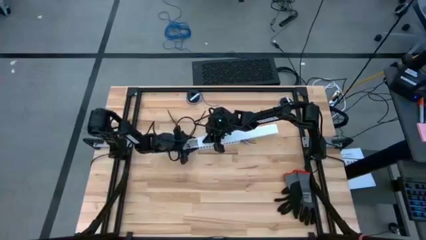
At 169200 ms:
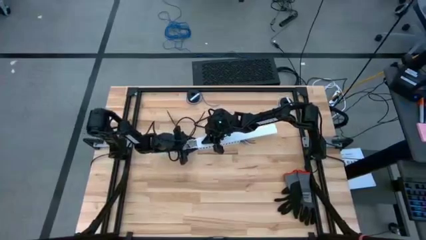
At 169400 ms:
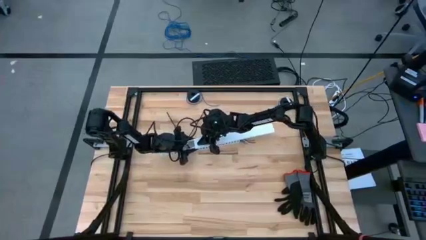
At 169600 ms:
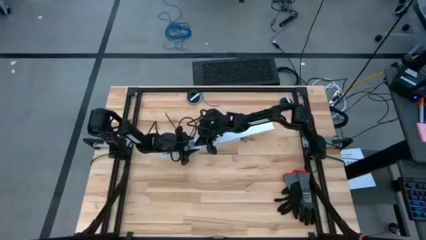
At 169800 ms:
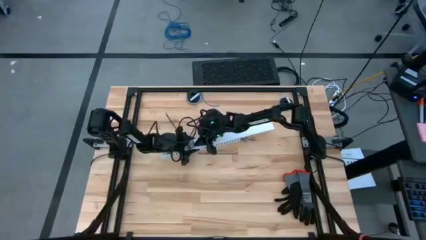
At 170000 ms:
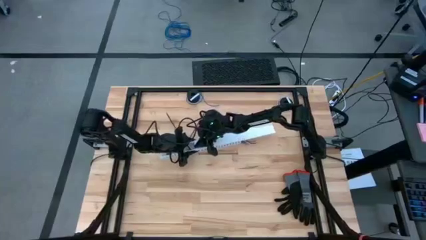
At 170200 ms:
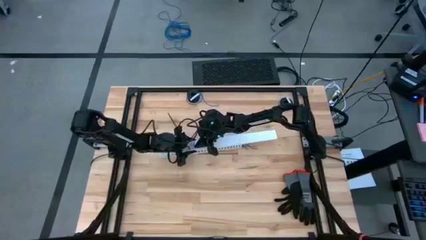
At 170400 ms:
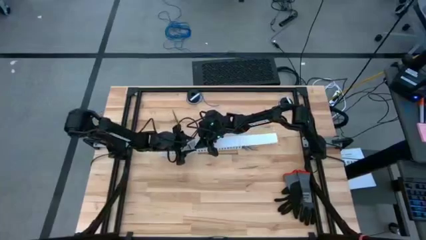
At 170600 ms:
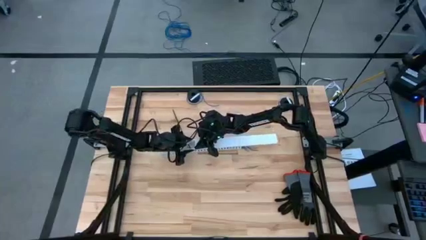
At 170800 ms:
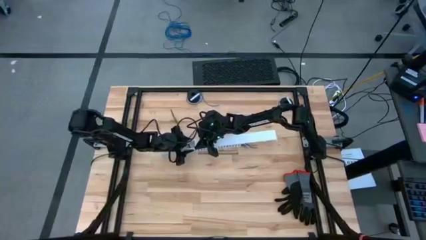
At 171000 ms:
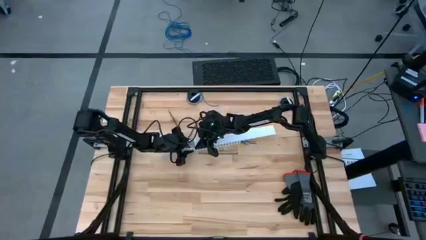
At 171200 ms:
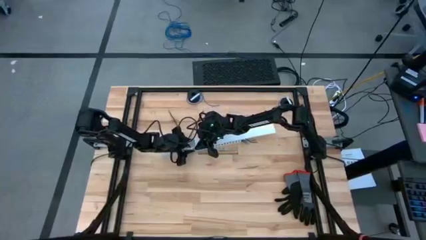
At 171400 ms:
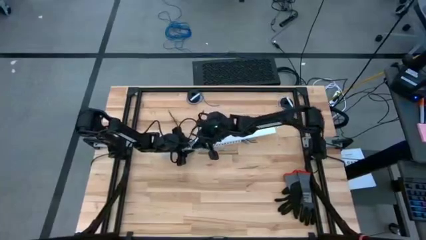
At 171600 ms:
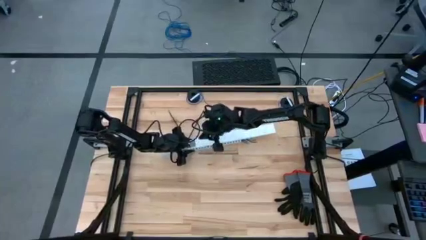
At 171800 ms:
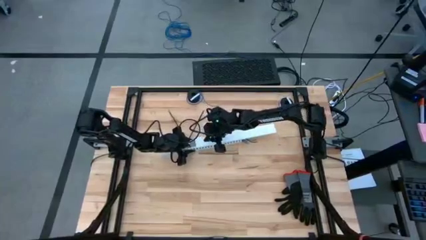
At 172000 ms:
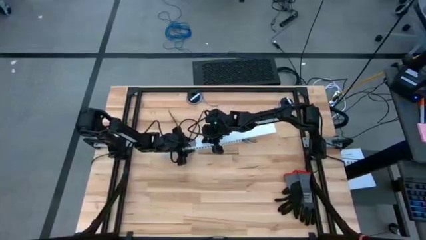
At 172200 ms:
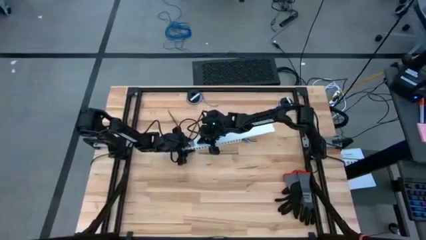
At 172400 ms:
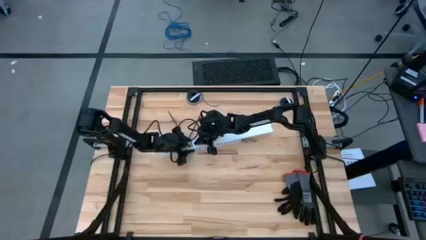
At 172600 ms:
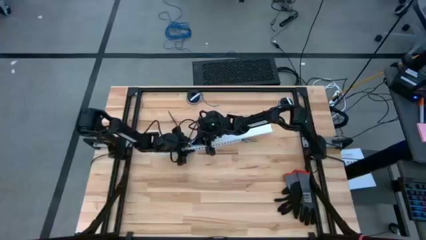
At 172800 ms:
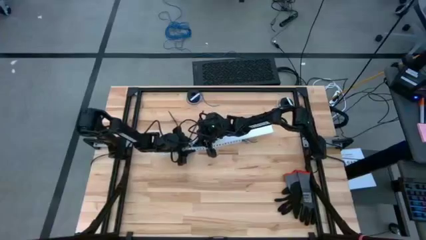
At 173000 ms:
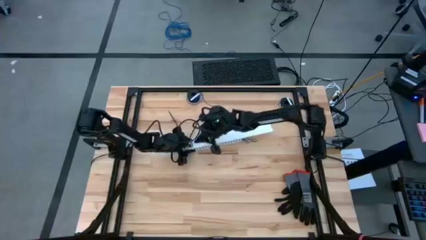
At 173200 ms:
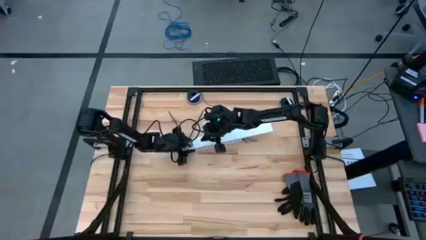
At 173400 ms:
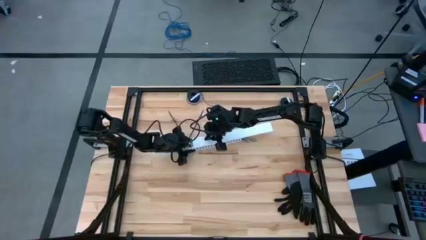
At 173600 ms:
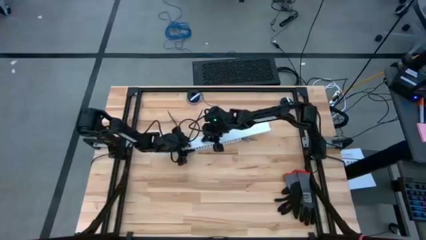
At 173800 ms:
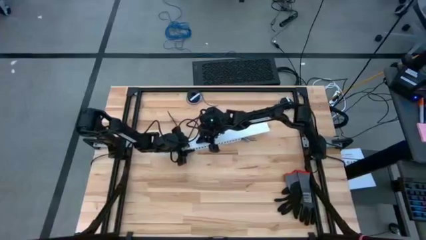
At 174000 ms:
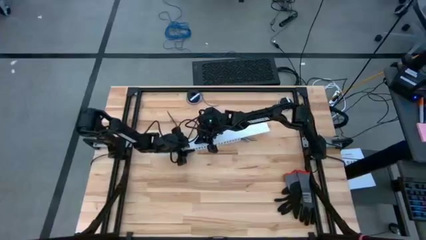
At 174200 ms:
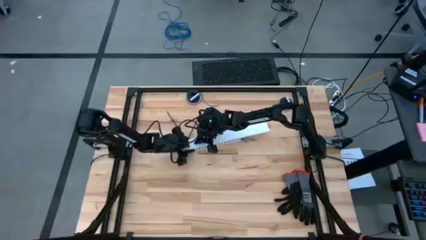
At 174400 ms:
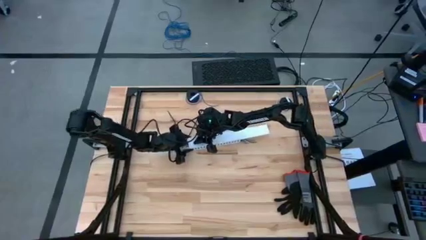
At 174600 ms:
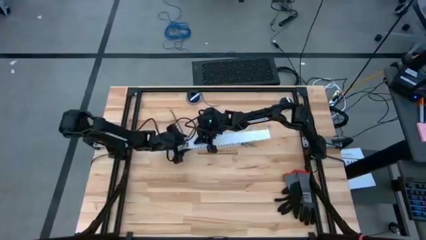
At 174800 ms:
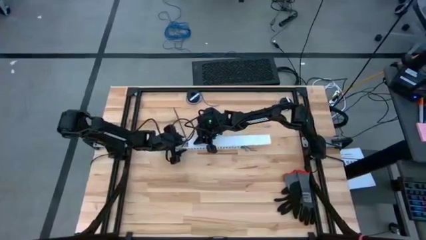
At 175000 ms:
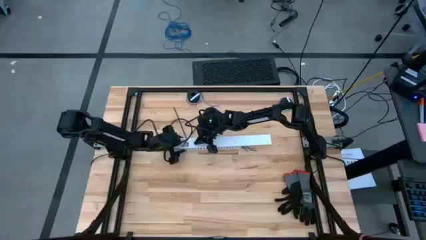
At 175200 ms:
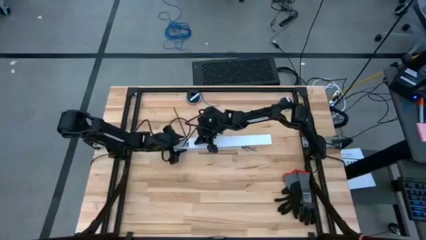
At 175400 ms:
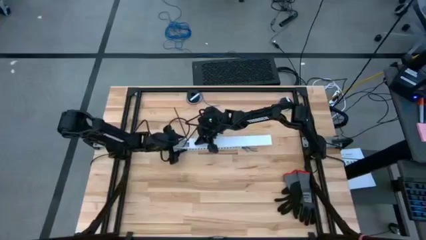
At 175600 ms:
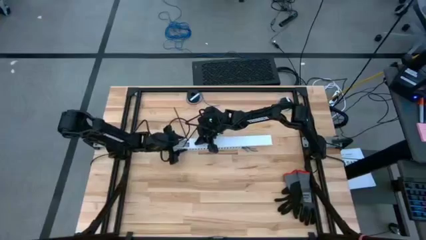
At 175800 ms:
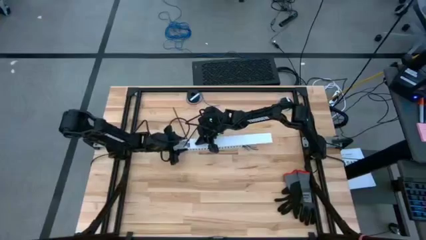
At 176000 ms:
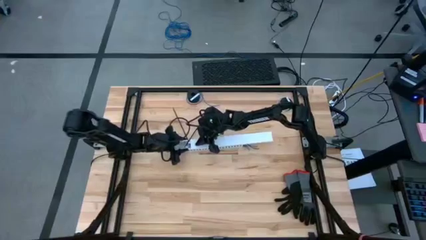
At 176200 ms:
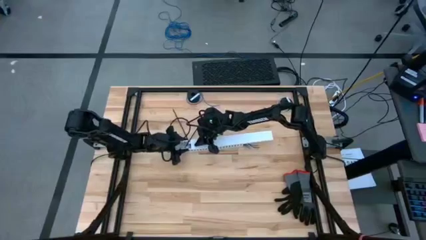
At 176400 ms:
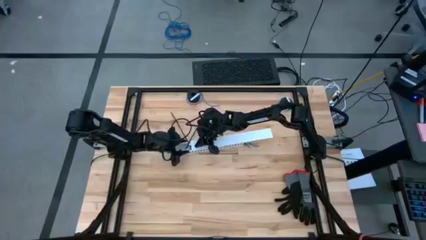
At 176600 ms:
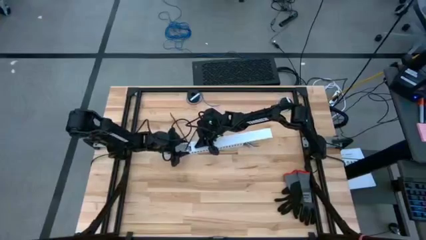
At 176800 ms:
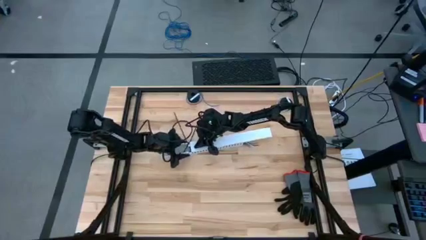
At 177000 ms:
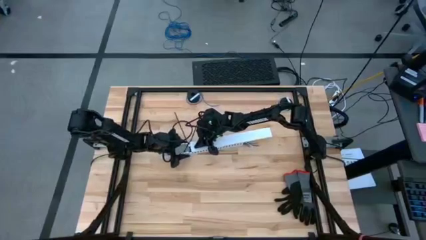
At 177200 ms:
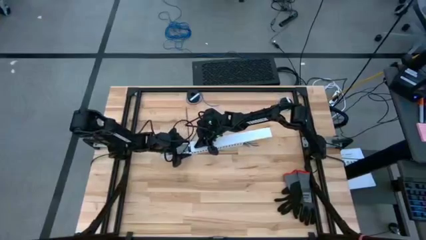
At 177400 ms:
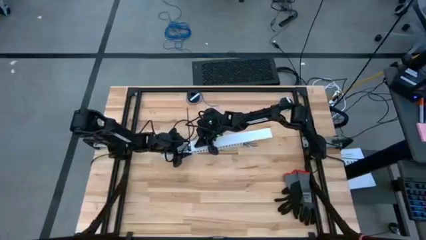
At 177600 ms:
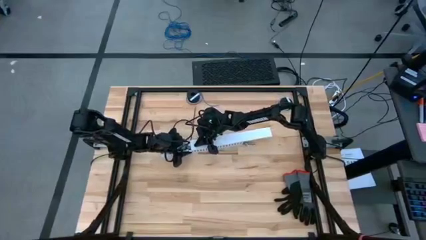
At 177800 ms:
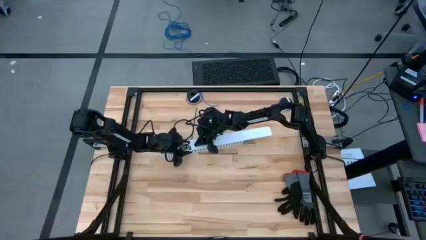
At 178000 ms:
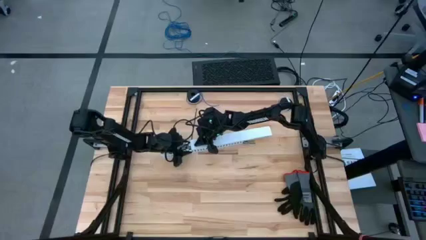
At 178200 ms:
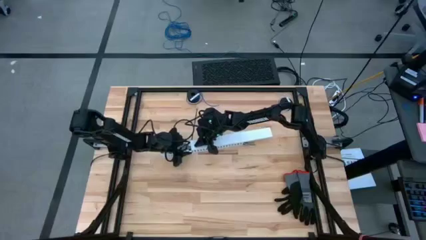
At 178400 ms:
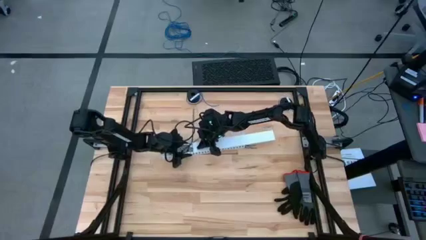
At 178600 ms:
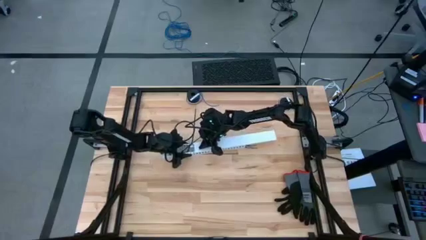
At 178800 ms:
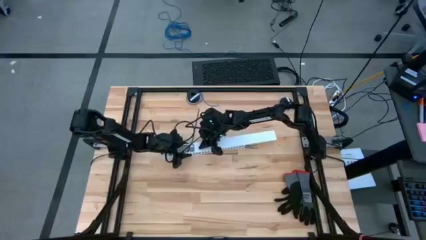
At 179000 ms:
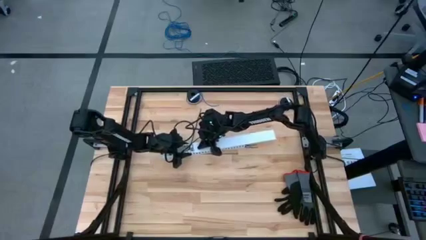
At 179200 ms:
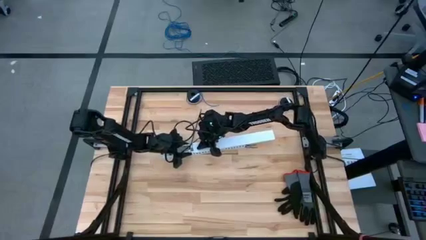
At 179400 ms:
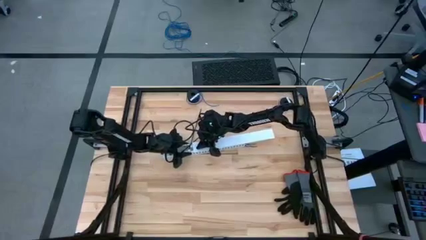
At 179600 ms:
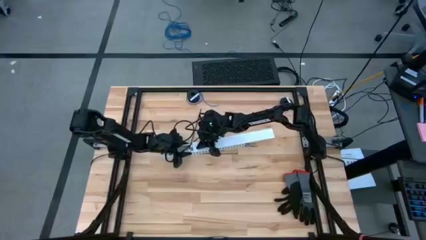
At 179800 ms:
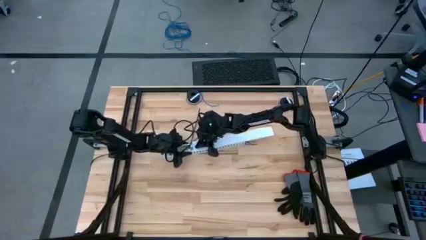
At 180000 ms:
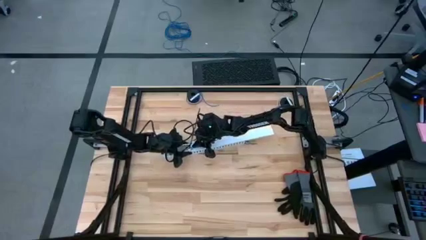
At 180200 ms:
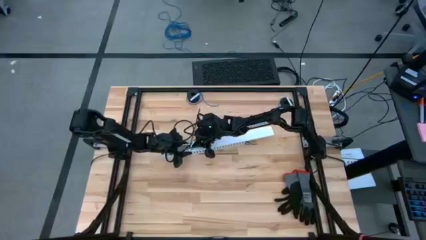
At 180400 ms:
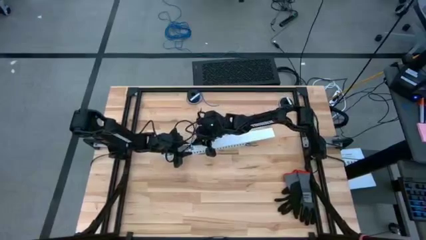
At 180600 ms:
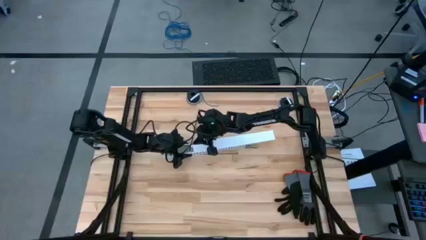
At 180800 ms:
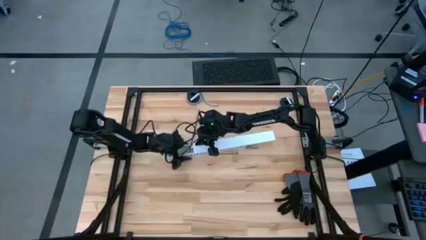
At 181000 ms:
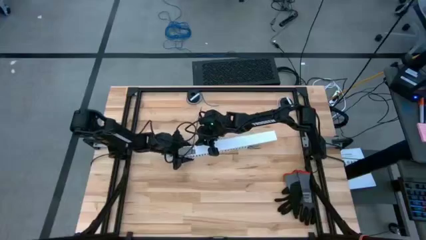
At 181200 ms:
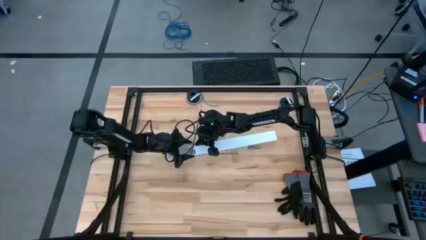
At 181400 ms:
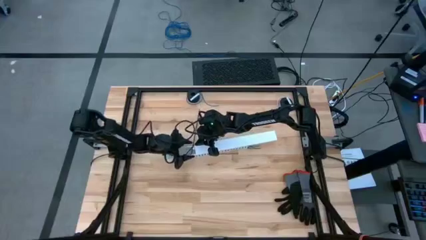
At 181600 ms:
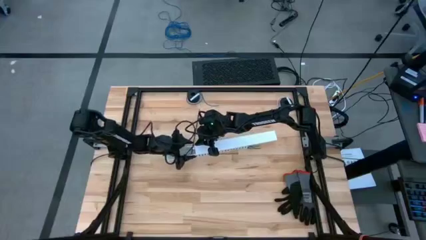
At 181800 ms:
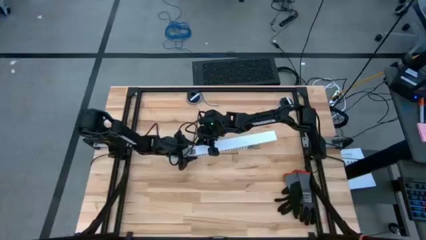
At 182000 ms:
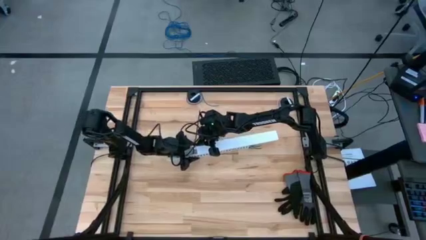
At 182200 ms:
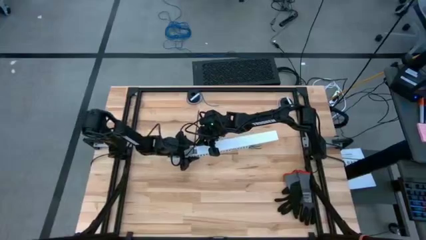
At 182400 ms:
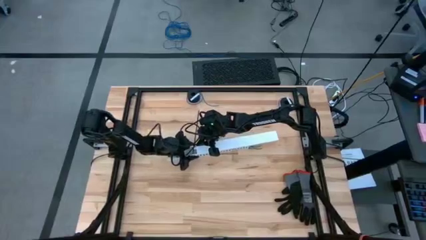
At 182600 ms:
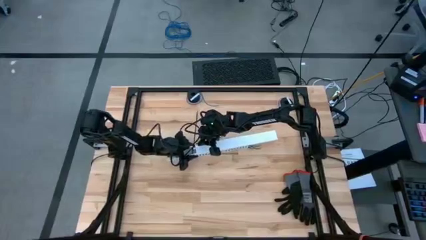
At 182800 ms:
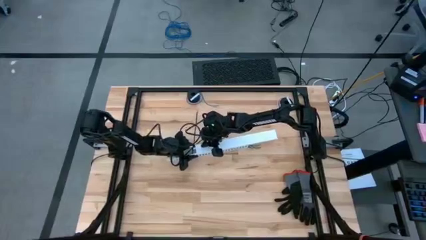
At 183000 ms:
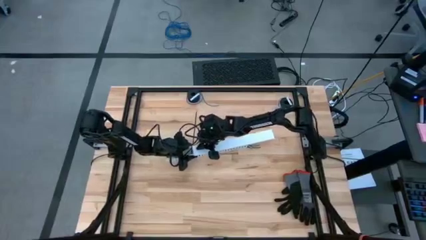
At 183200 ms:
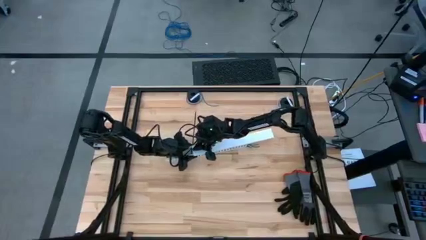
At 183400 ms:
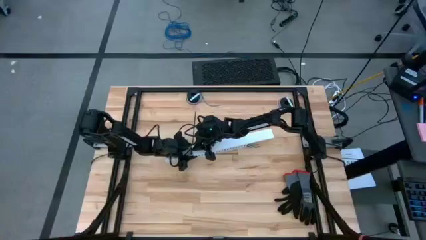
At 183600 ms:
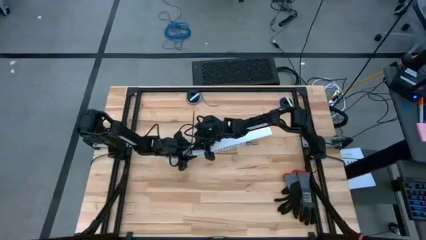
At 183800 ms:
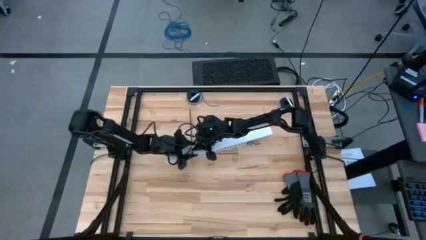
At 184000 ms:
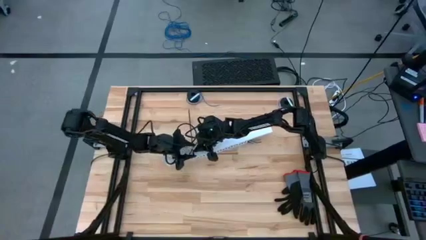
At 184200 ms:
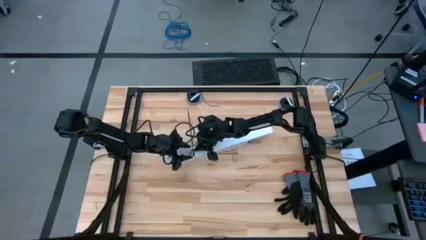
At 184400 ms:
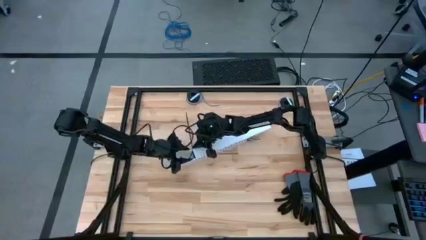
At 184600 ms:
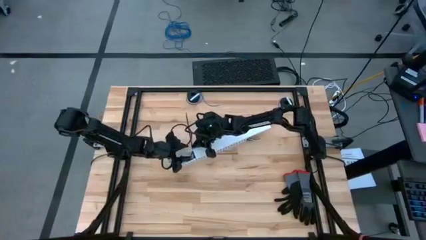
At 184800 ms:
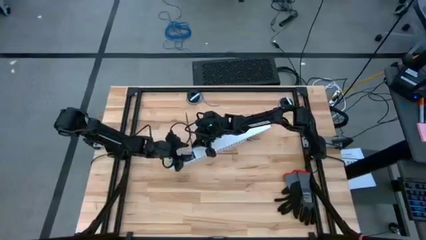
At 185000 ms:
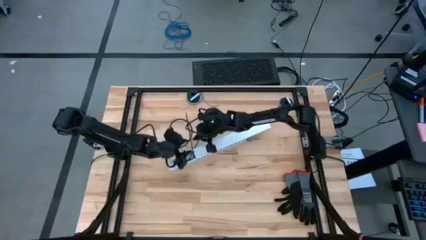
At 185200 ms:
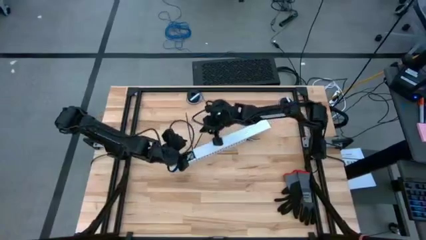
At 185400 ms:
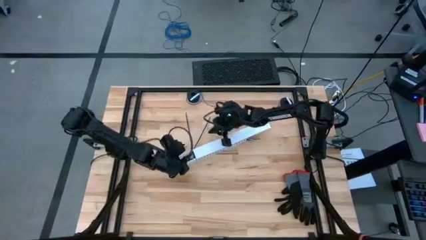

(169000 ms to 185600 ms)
Task: Ziptie cables
Close the white cable duct tray the with white cable cover
